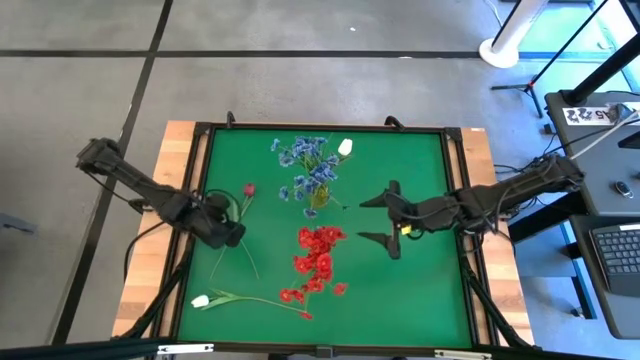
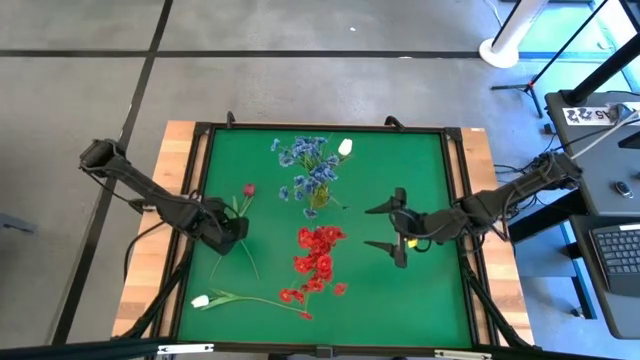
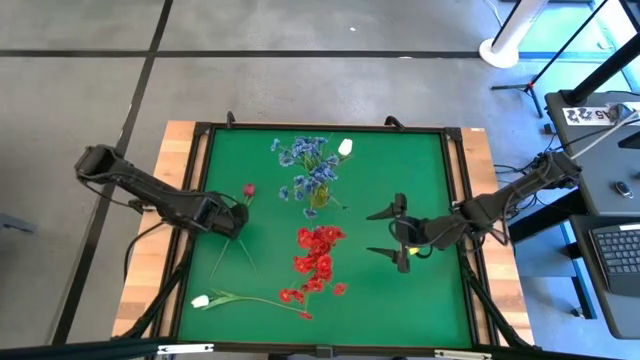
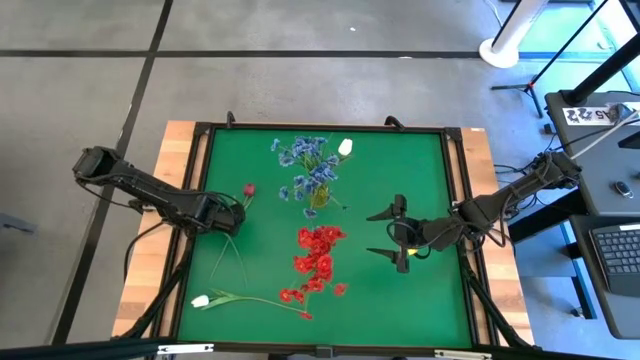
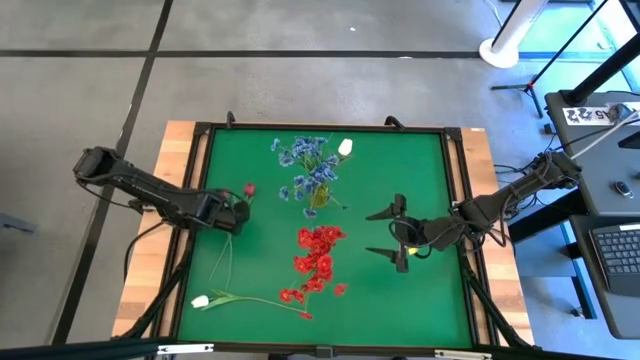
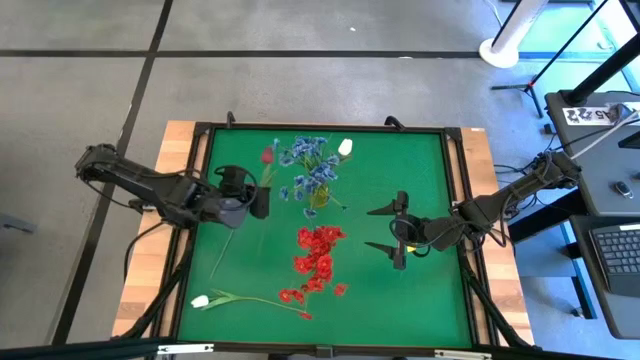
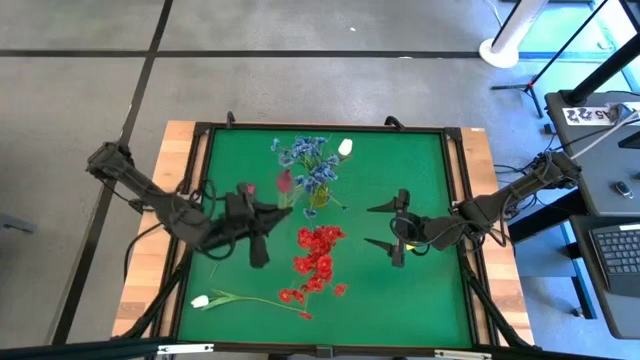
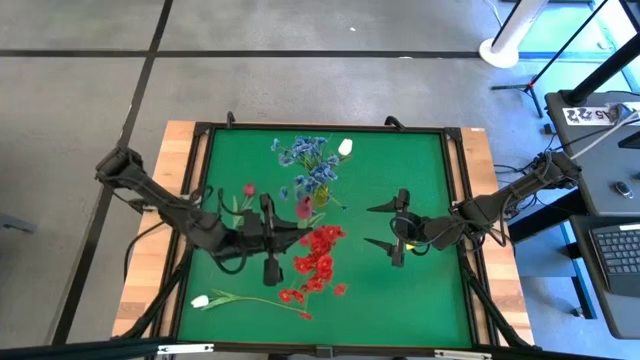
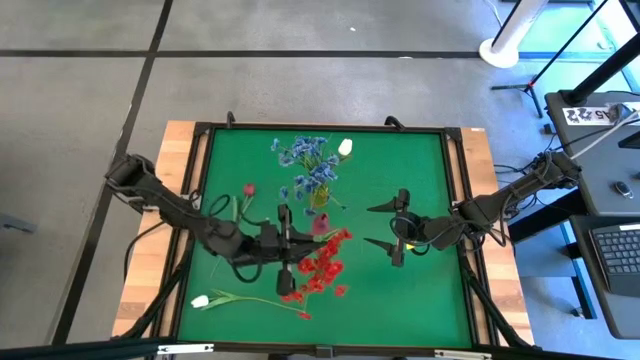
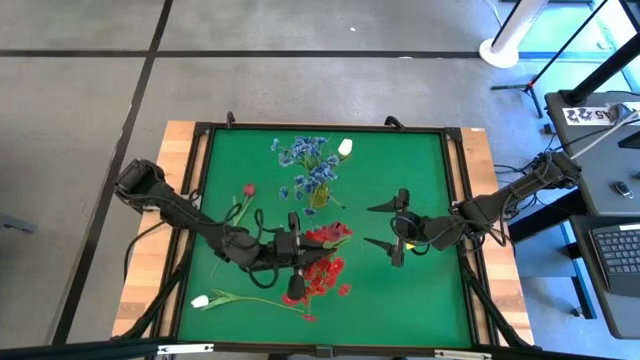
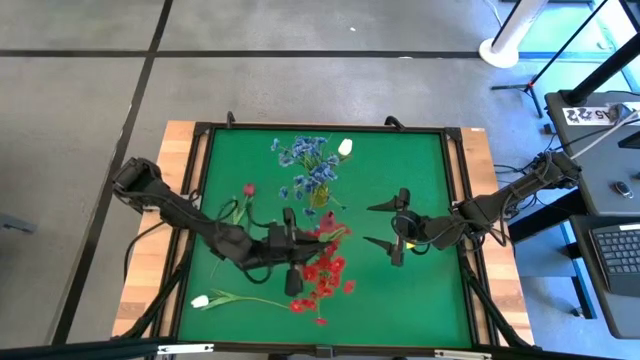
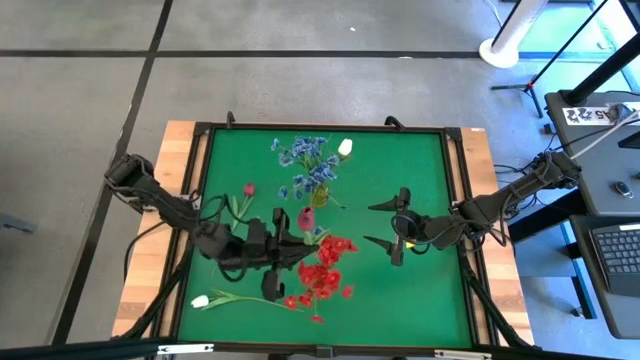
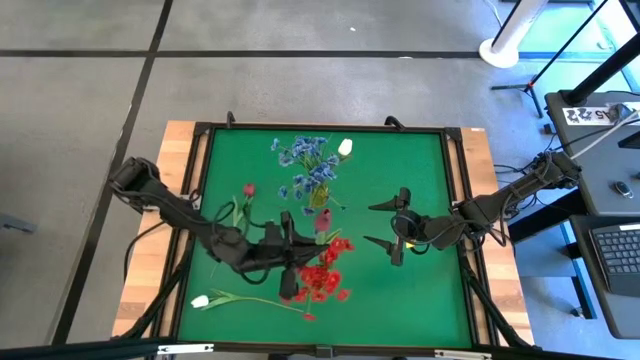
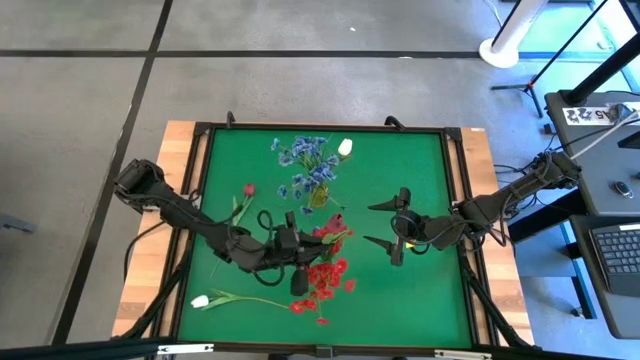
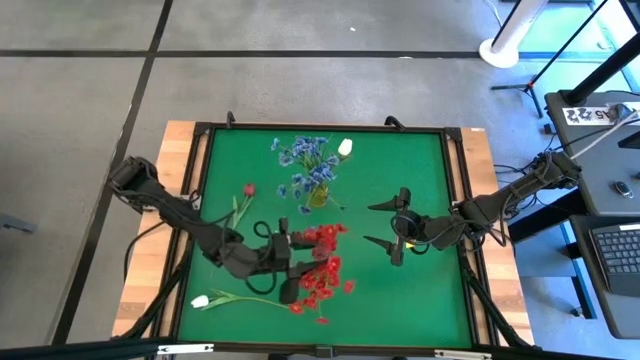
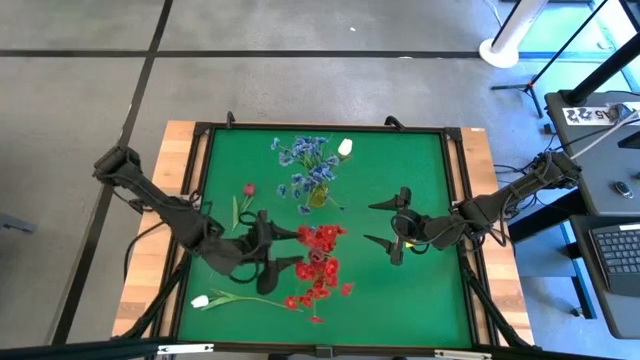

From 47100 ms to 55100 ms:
Task: Sort flowers into vase by color
Put the left dark red flower into the transparent flower vase

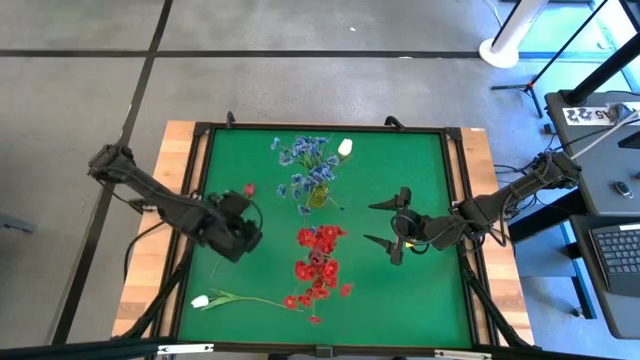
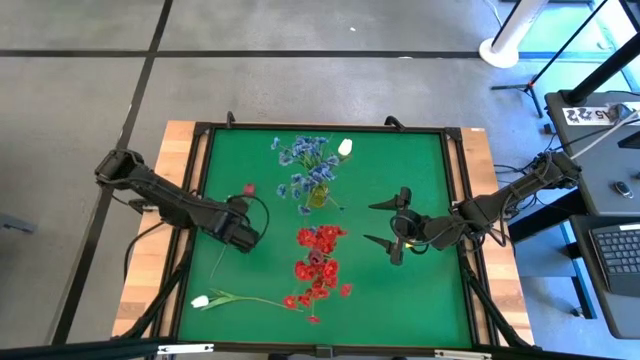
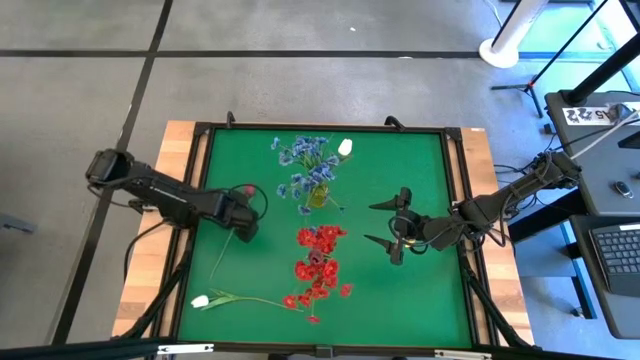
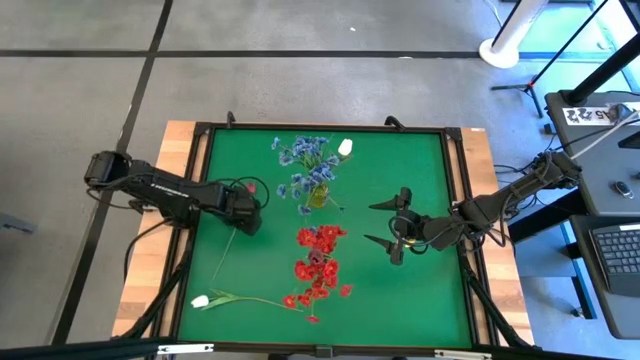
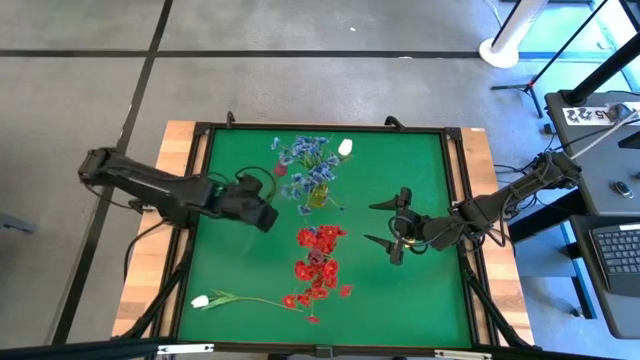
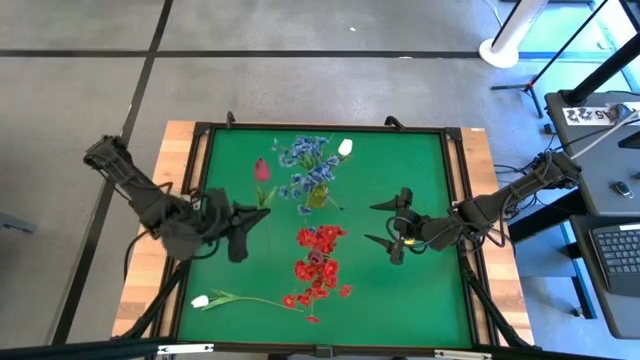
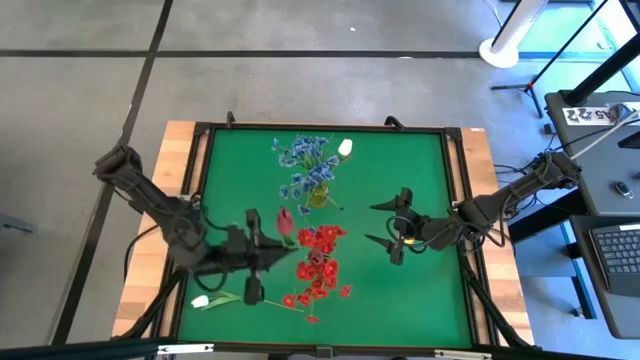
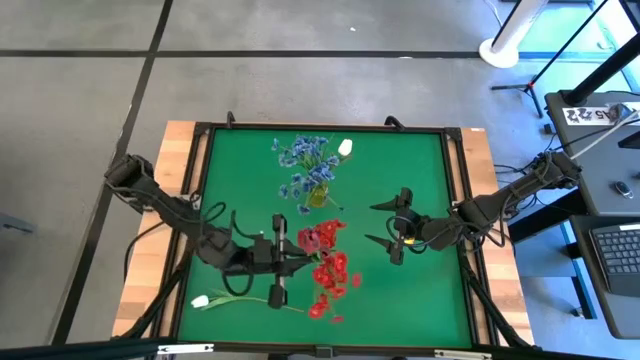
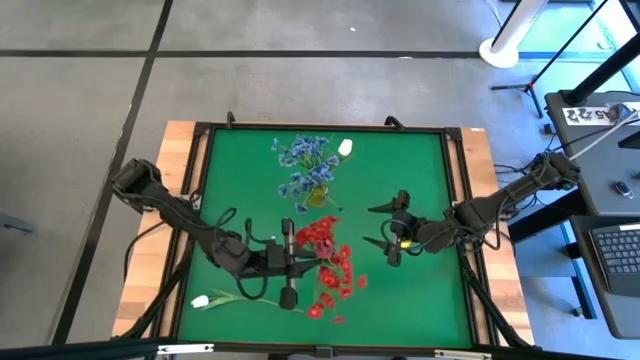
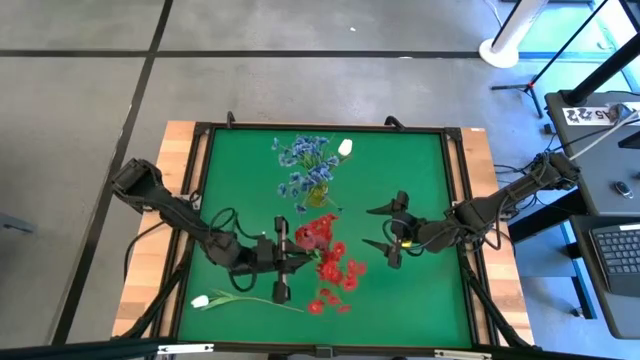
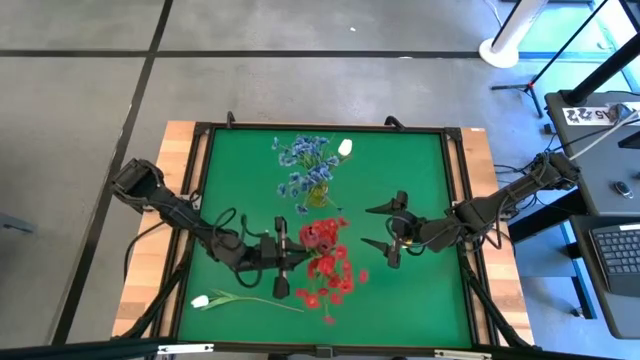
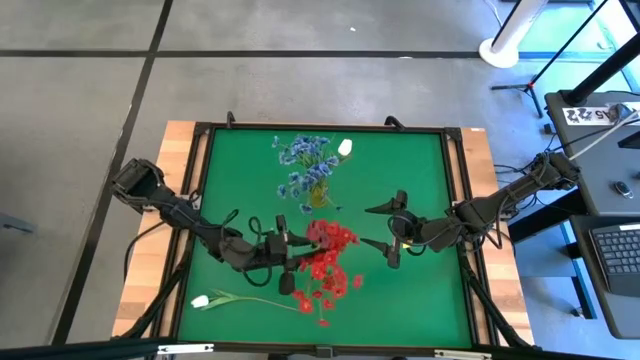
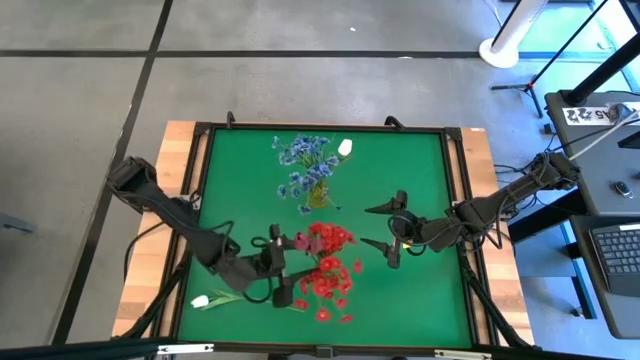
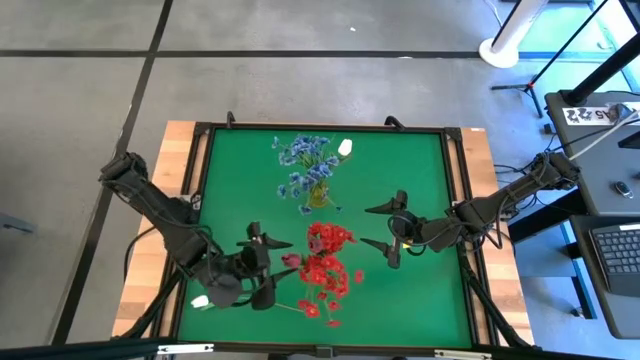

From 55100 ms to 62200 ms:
Put the dark red flower into the transparent flower vase

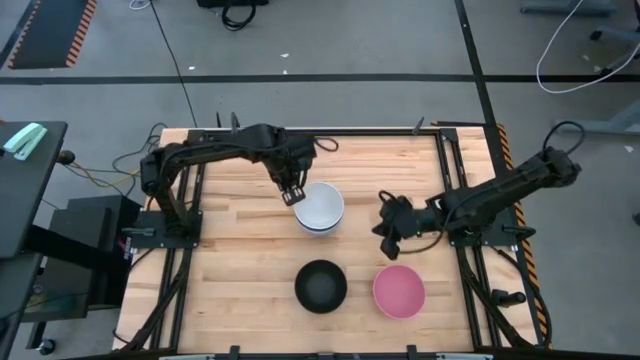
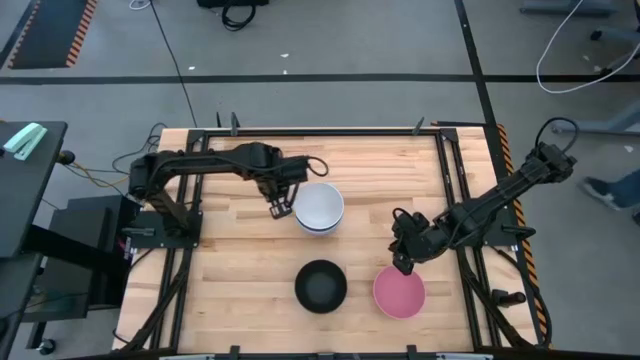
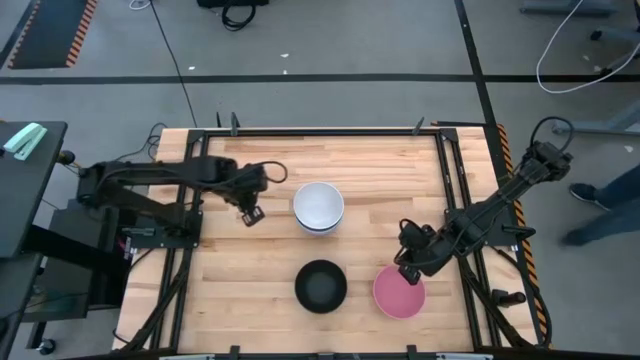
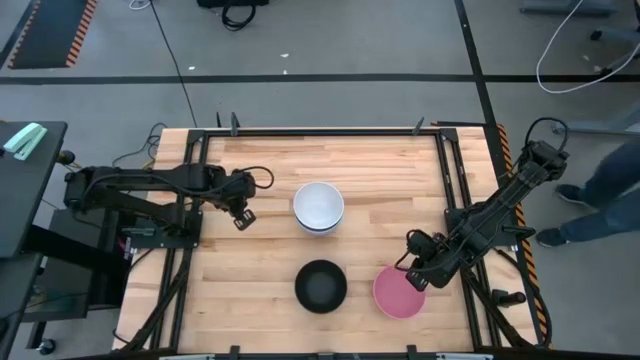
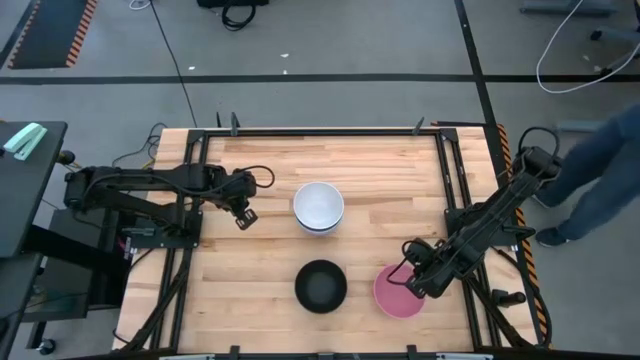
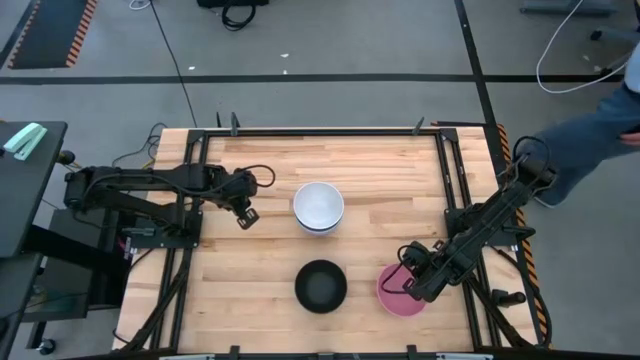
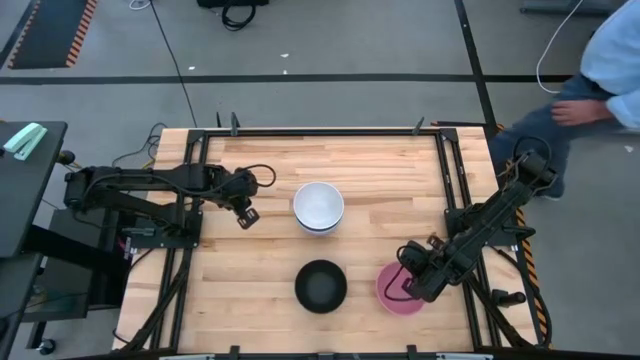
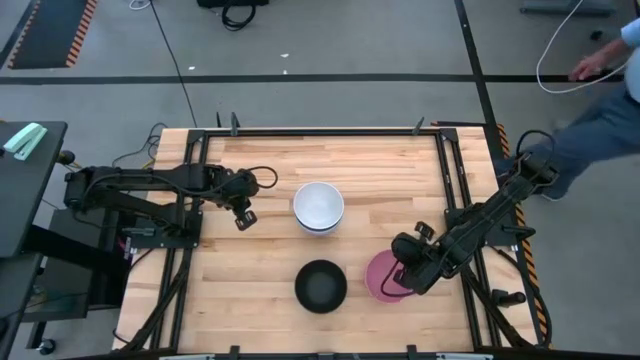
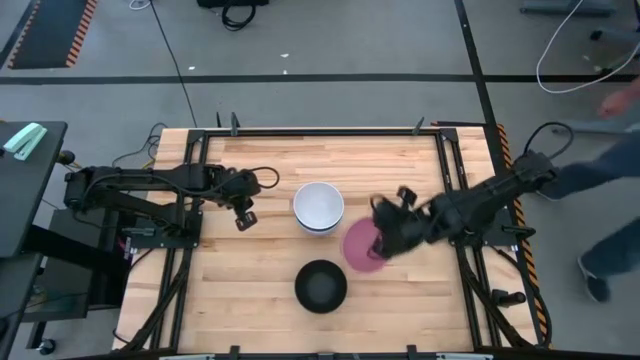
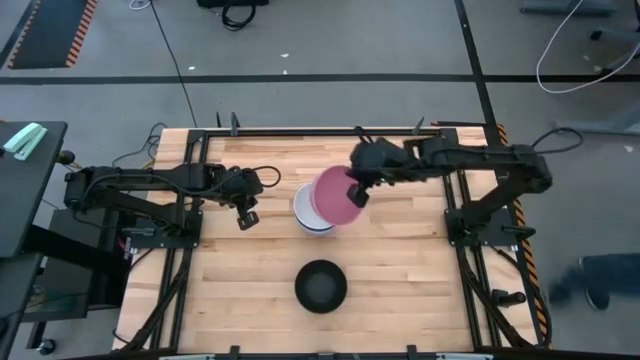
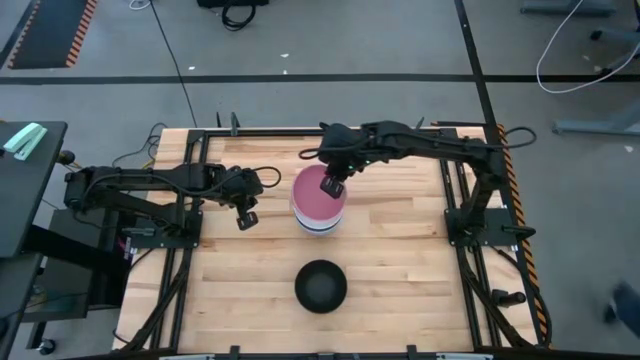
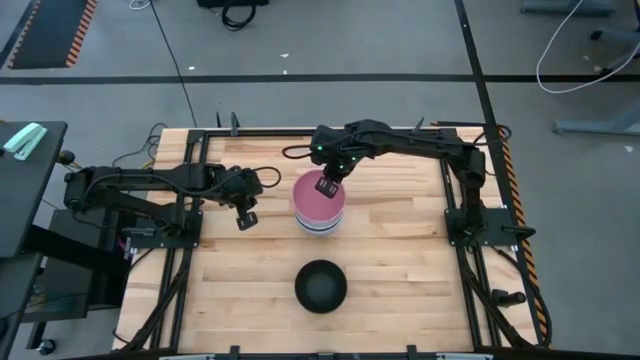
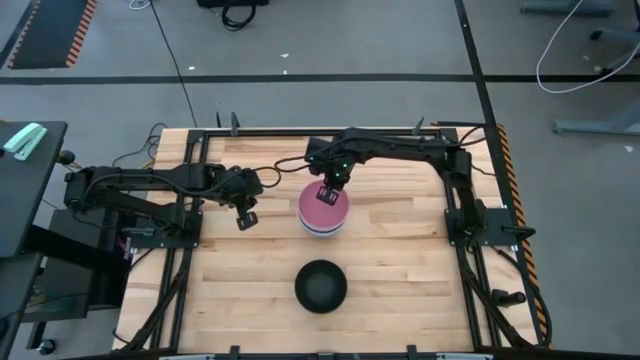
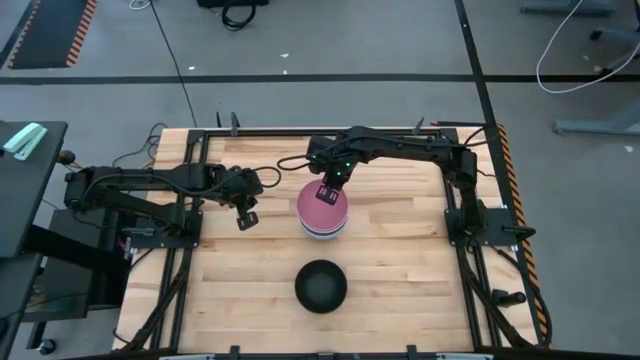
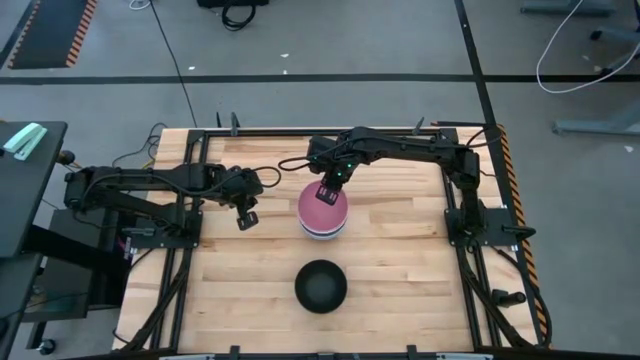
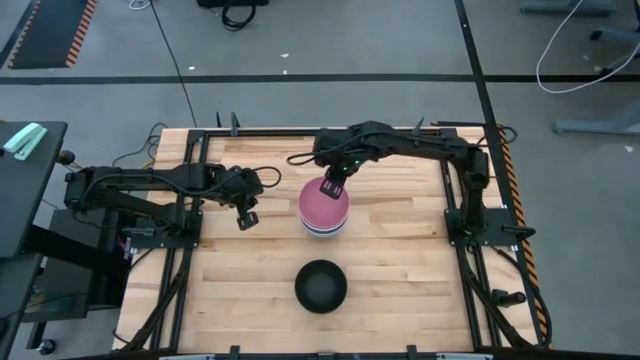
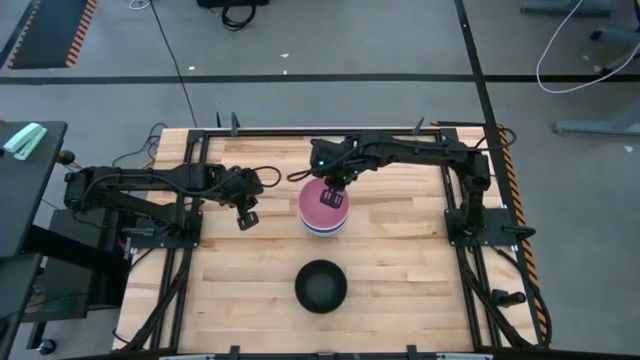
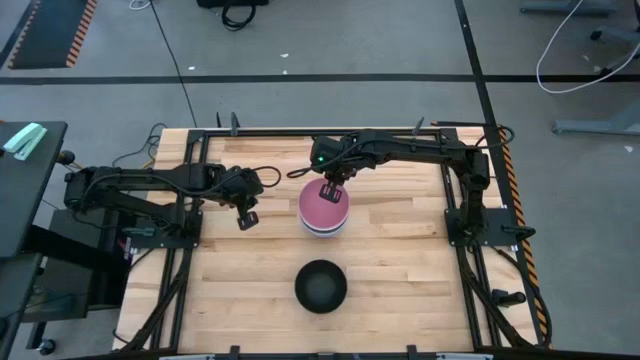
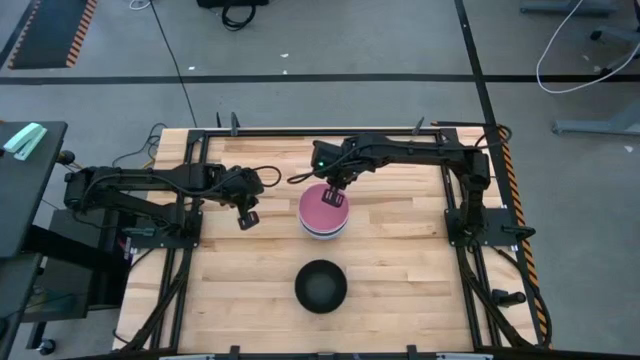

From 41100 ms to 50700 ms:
Task: Nest bowls inside each other
Stack the pink bowl on top of the white bowl
